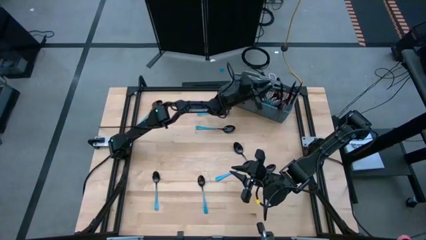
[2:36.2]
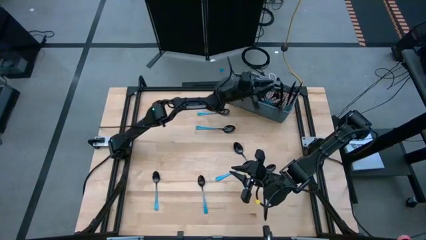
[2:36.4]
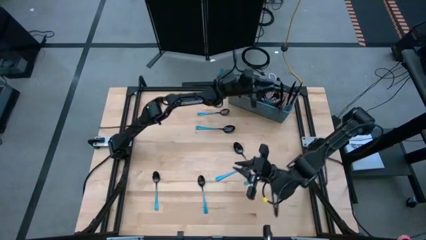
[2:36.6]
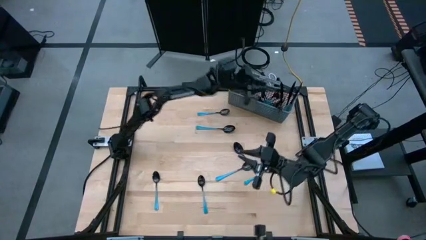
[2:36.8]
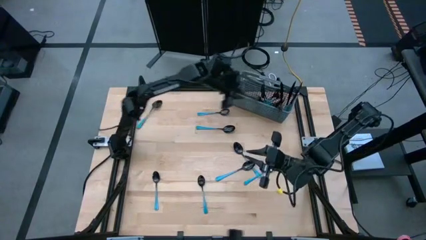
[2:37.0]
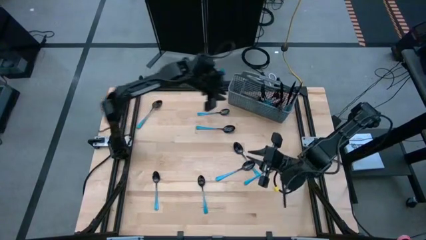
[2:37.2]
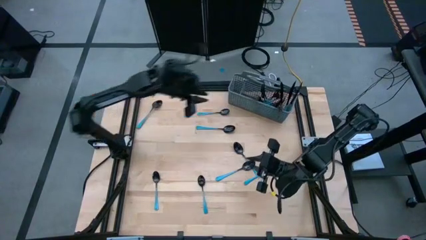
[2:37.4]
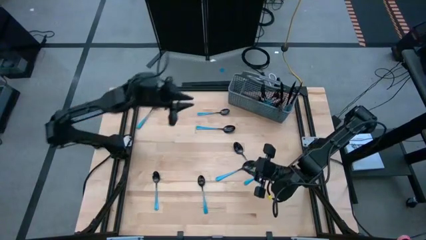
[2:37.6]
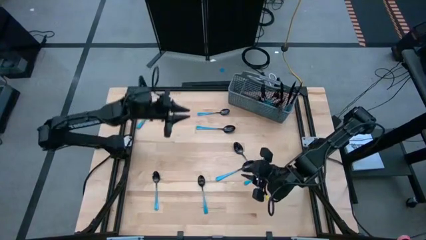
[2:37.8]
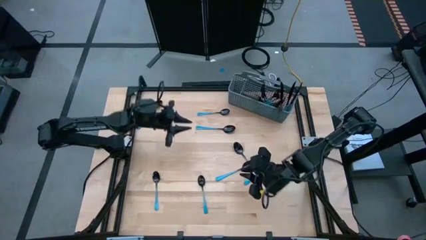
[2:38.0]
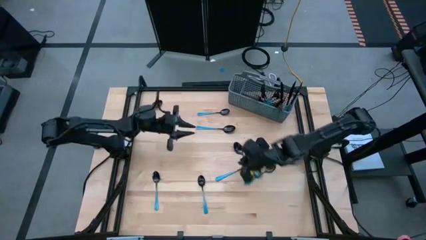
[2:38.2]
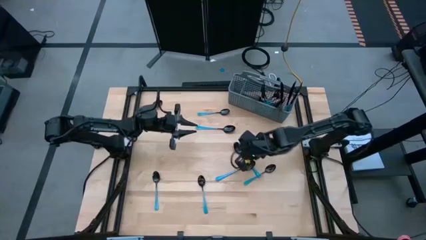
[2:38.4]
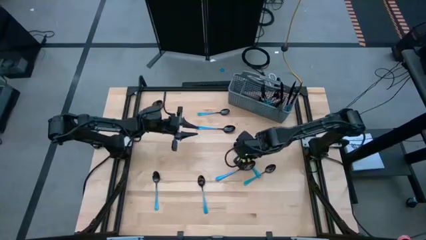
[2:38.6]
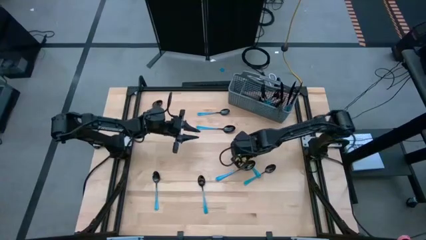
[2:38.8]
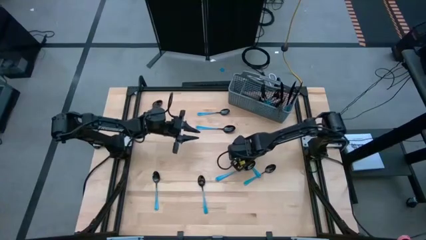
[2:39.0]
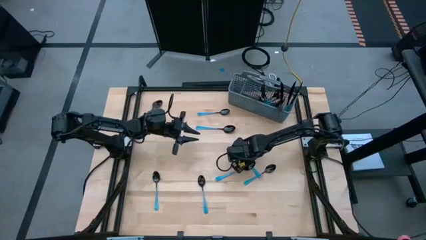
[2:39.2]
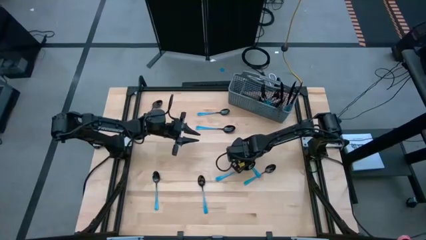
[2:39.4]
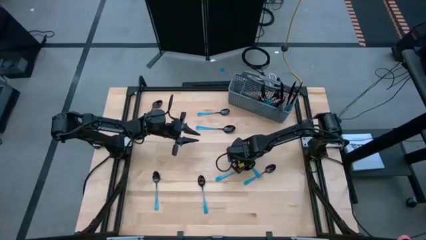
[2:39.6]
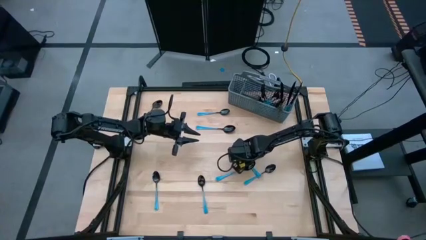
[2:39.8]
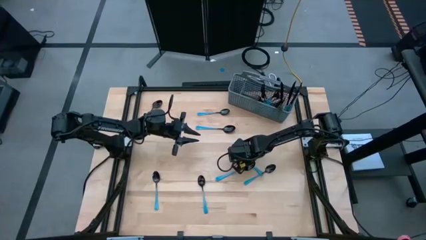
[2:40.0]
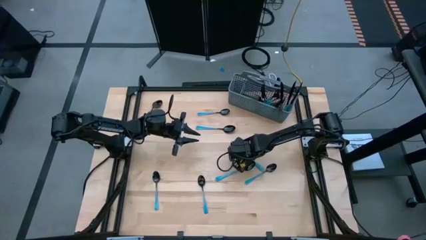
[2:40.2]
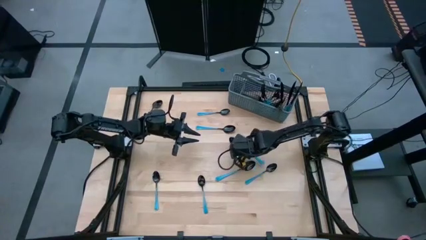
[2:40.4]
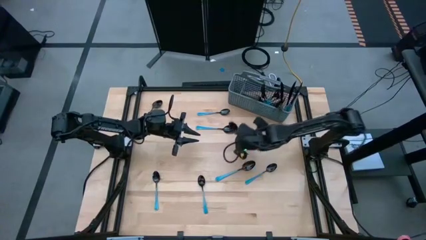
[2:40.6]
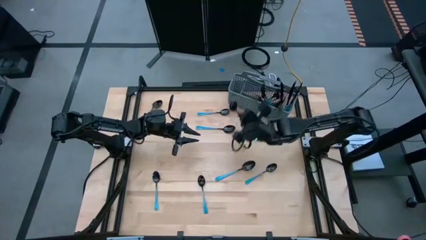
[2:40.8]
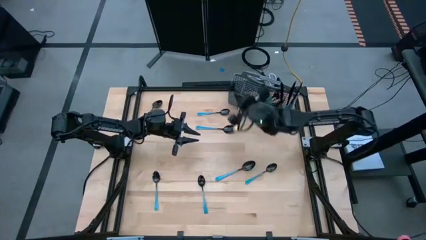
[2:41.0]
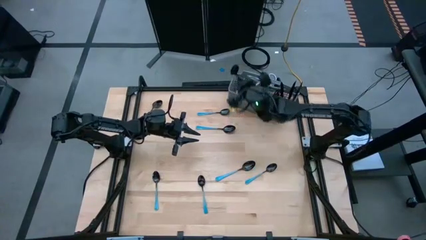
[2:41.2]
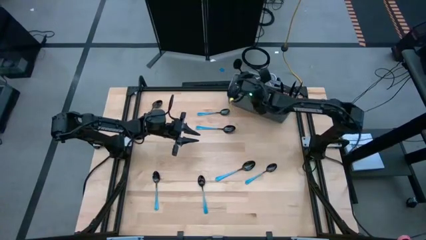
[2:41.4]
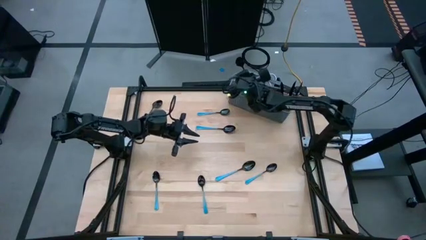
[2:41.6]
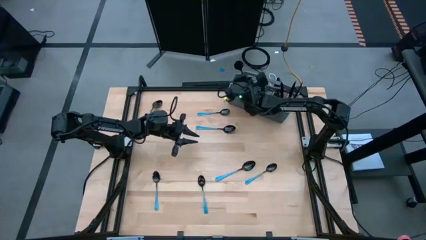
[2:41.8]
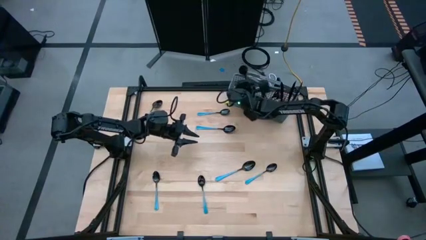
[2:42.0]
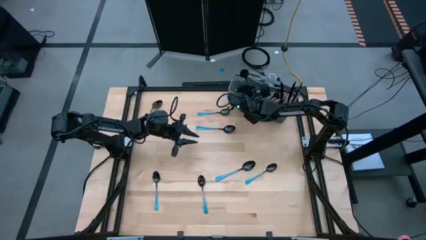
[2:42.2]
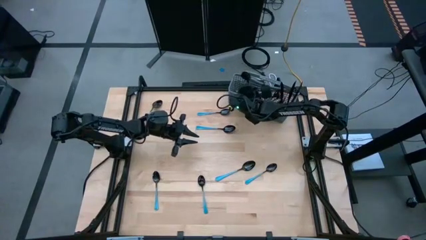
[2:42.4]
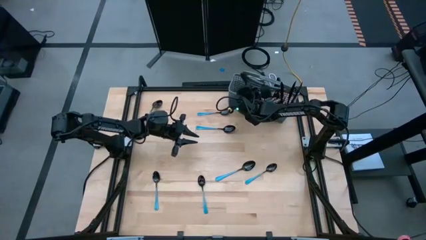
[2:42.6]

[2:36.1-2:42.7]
Task: Sort silverware
Put the blue spoon into the left of the blue utensil organizer

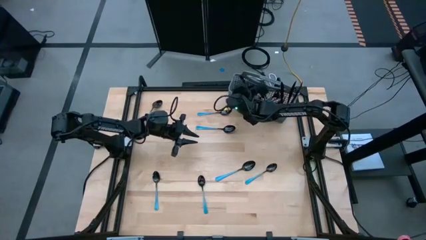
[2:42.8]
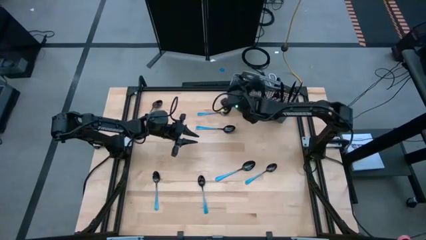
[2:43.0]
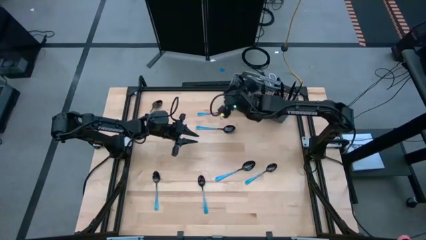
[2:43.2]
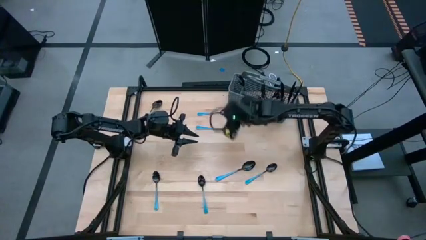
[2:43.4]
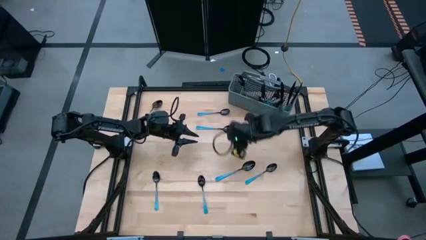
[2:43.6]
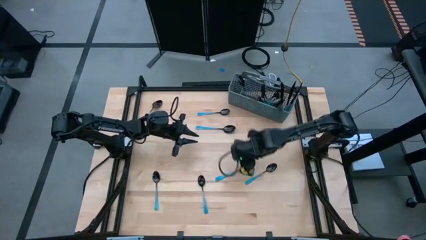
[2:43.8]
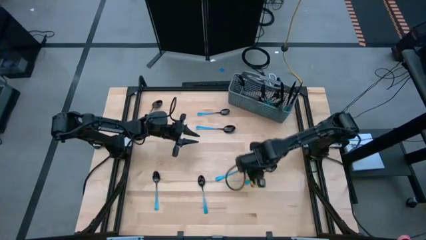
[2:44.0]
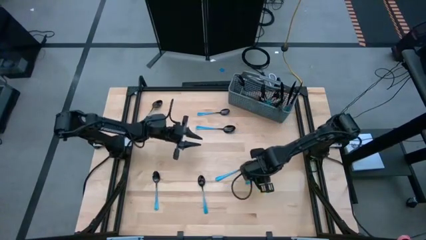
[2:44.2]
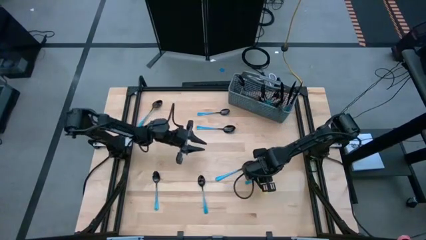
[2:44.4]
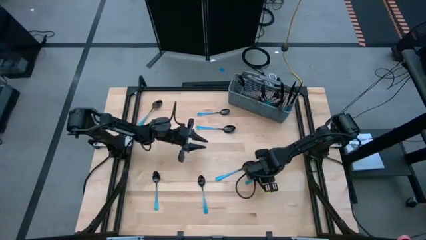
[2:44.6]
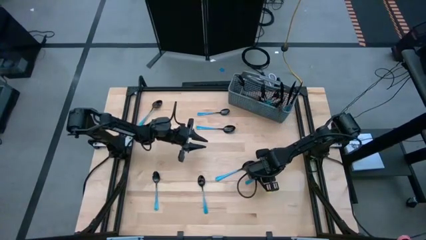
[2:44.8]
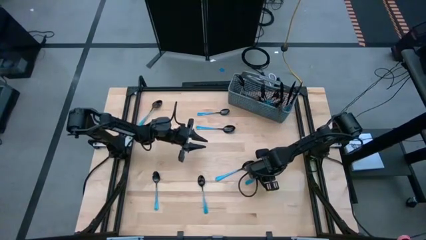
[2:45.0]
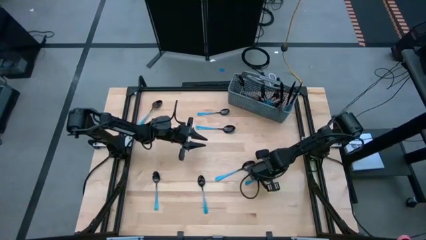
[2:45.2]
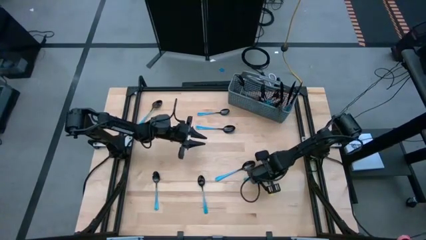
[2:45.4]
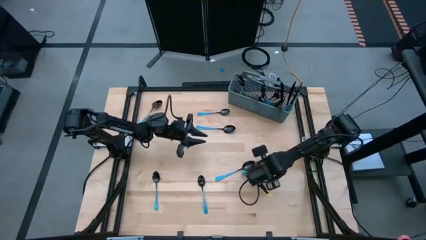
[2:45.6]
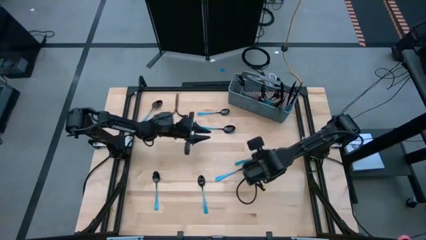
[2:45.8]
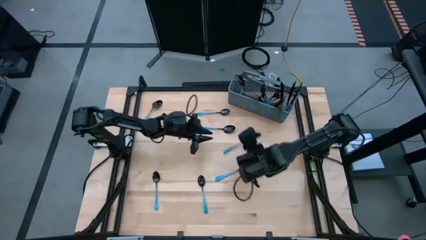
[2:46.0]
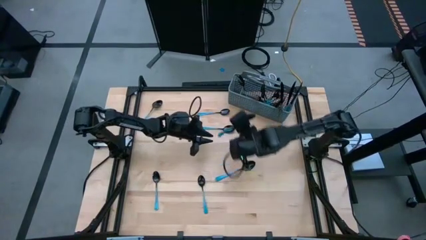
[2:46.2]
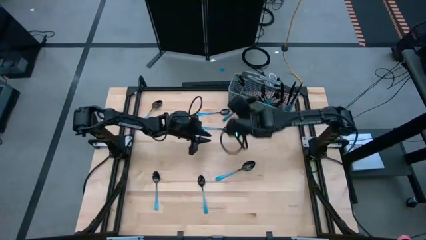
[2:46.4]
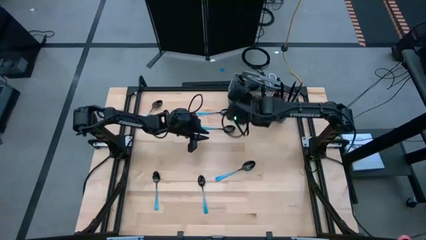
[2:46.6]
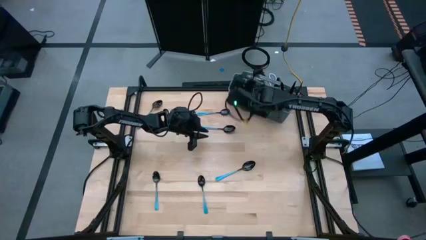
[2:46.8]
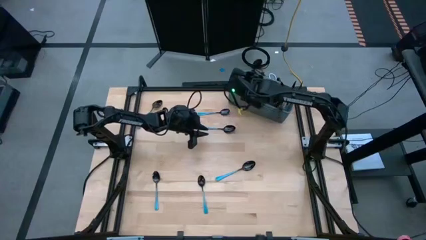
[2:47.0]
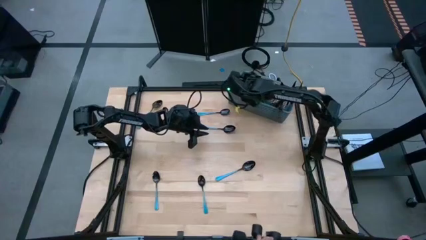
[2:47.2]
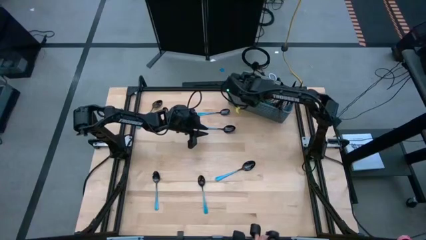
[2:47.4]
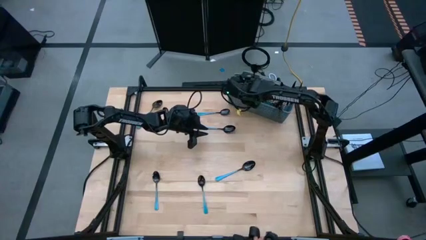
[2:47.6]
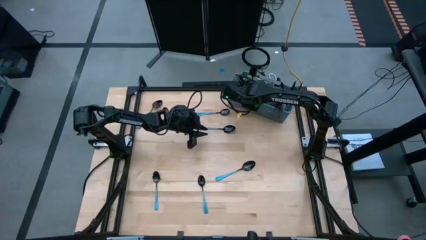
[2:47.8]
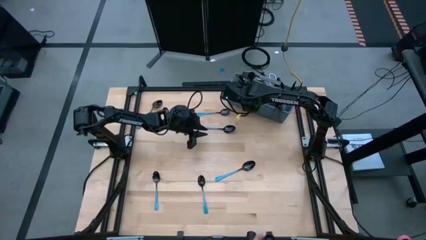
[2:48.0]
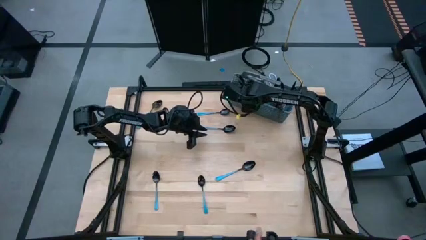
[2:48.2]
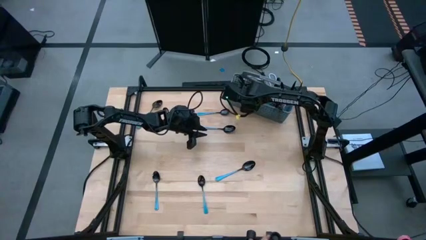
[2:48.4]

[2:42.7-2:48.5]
Put the blue spoon into the left of the blue utensil organizer

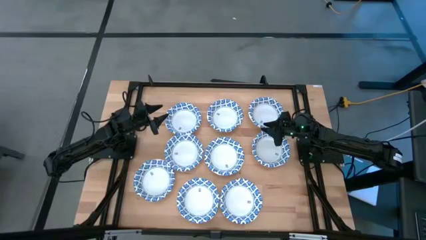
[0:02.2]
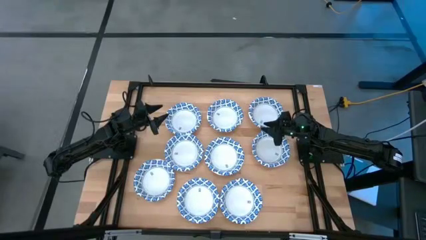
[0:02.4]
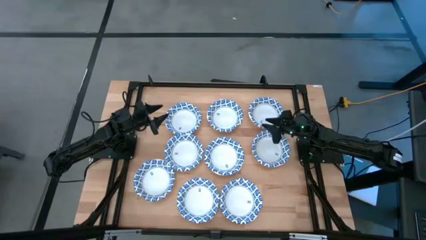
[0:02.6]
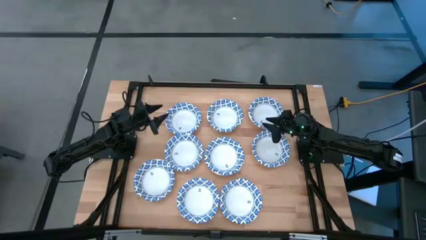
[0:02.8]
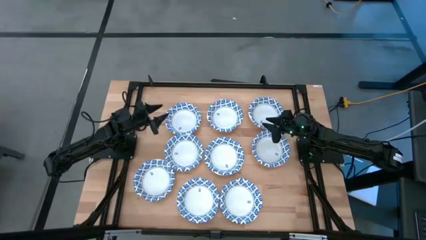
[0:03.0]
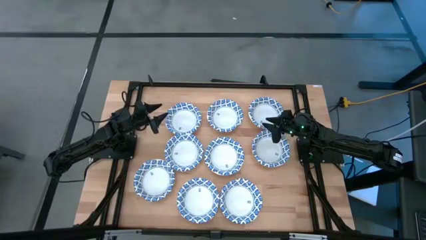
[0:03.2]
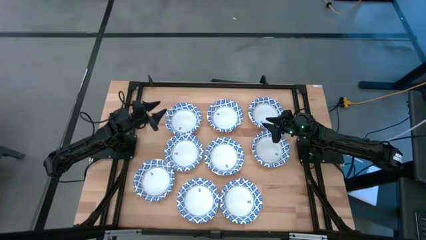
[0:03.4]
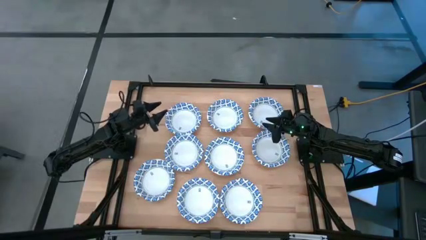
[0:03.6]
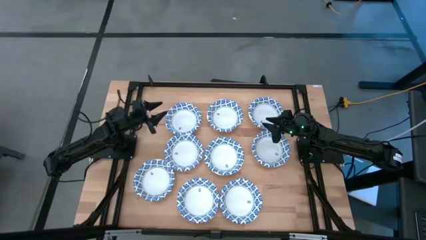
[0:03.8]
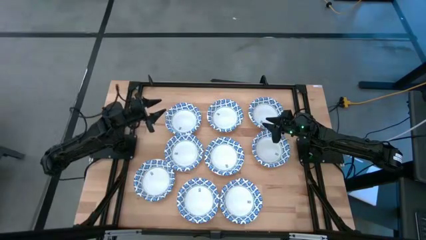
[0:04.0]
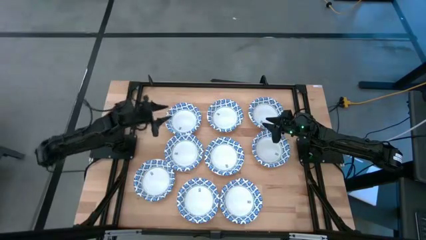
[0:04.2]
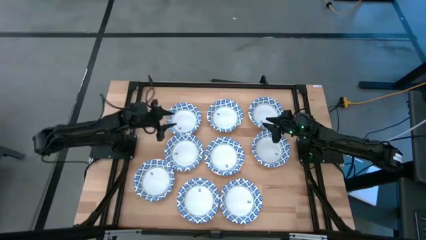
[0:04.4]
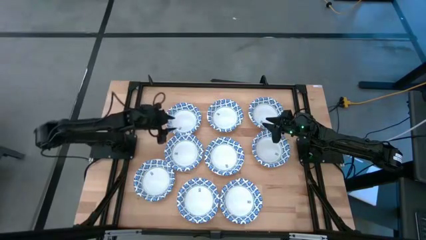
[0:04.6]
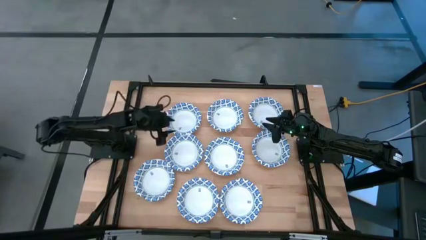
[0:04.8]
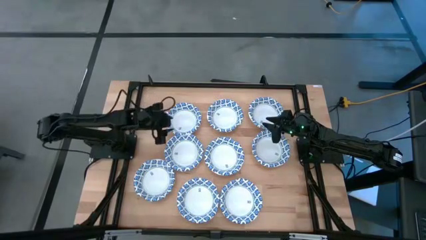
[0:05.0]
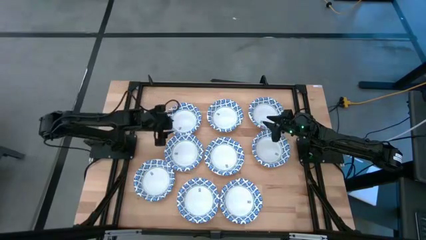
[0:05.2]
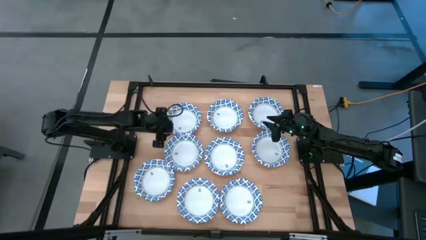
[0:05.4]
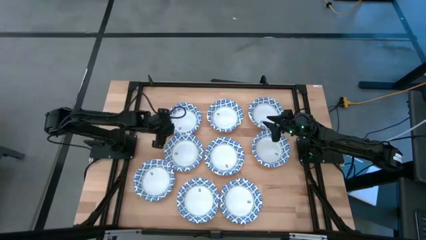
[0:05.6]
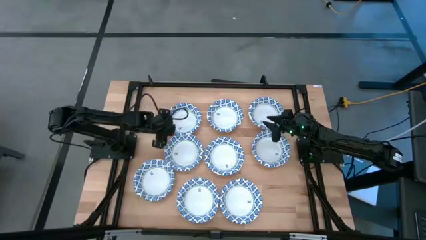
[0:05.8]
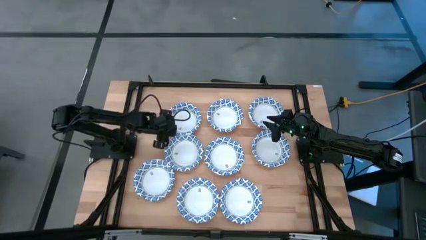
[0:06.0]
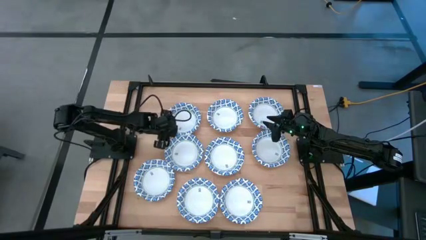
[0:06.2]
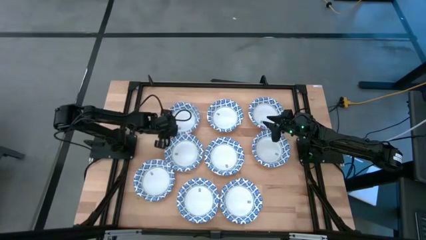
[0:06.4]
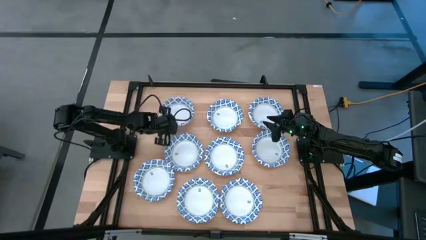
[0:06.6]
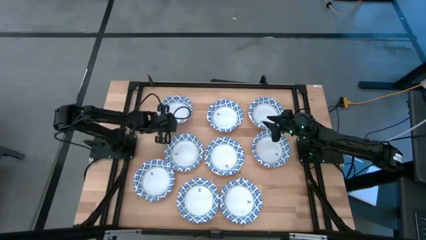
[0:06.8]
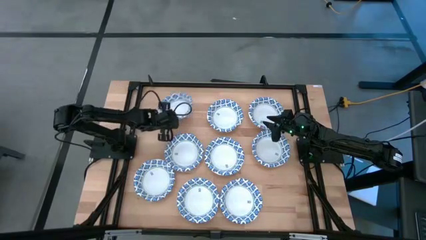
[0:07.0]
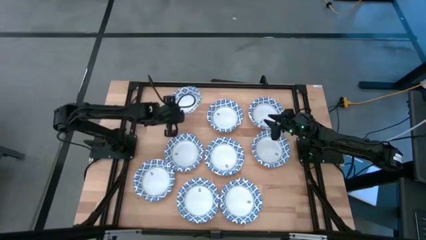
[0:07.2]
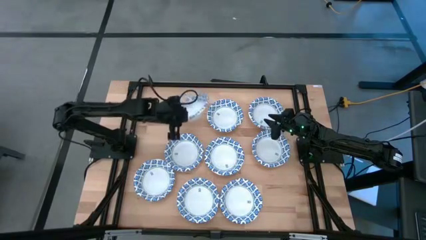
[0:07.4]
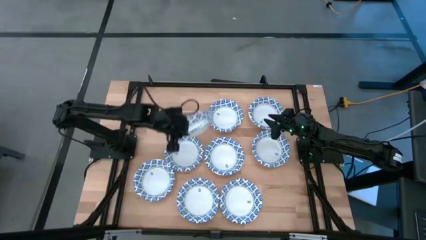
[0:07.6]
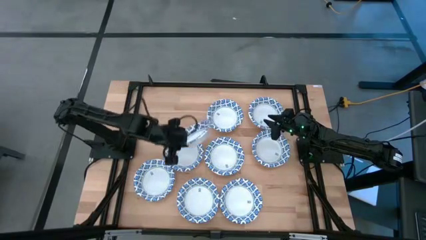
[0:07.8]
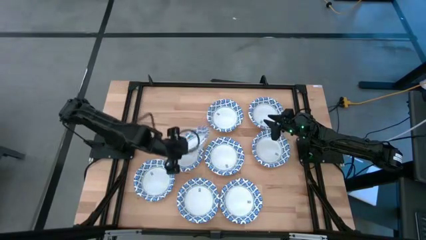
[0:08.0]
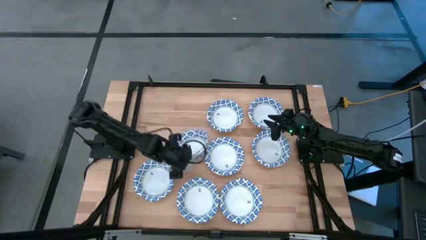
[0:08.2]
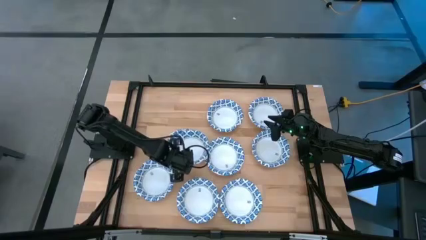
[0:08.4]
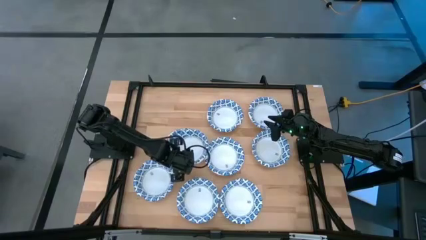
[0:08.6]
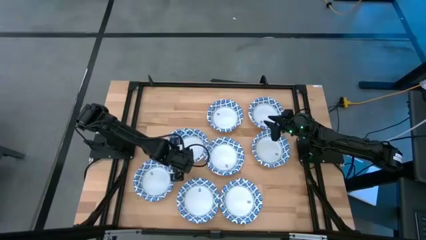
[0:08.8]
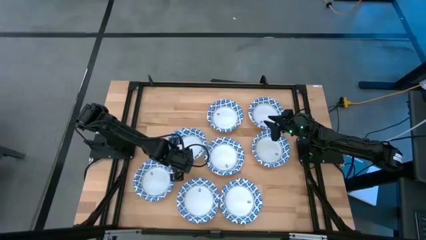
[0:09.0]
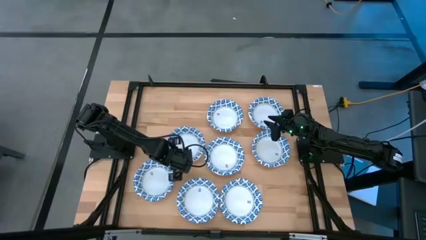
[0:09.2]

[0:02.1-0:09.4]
Task: Nest bowls inside each other
Stack the white bowl on the white bowl
